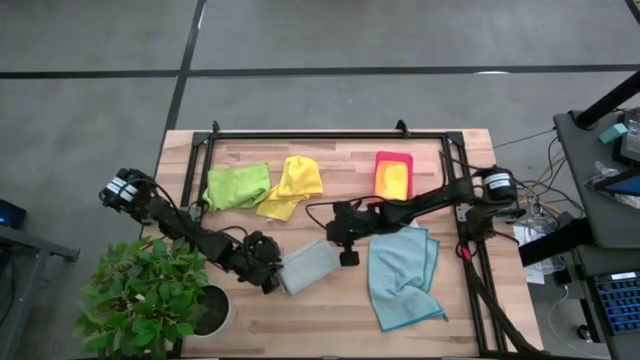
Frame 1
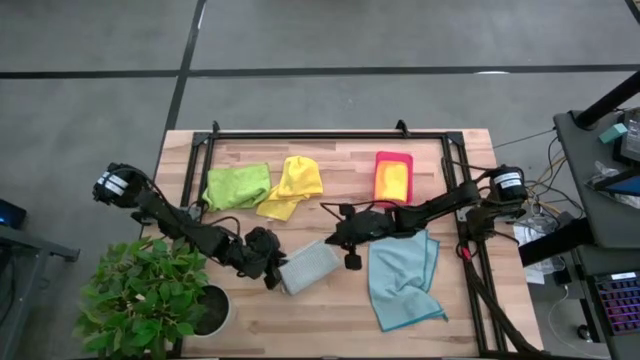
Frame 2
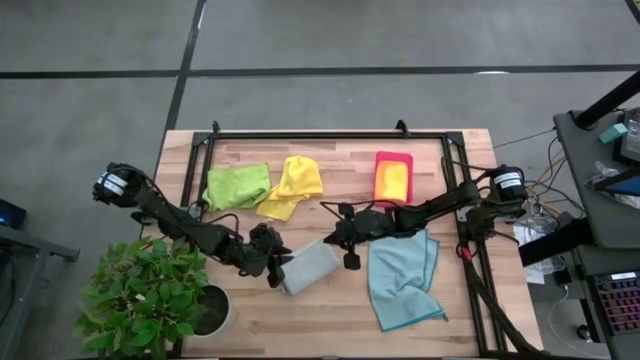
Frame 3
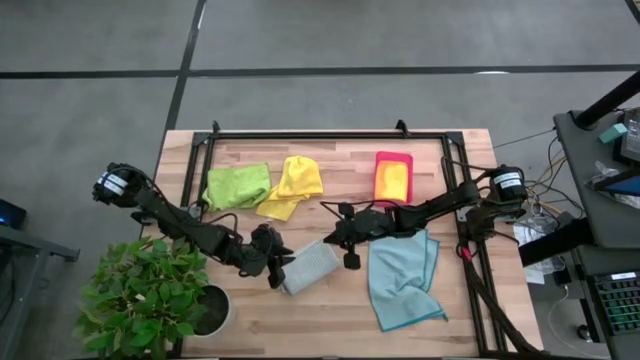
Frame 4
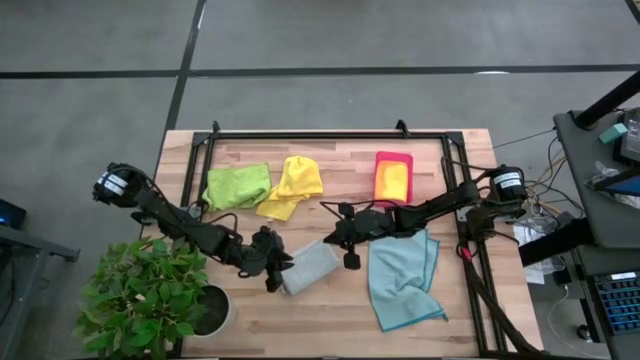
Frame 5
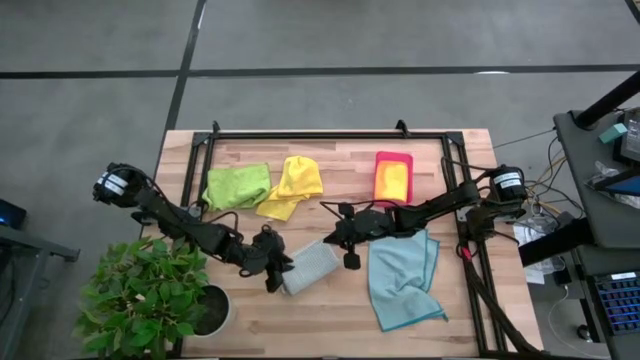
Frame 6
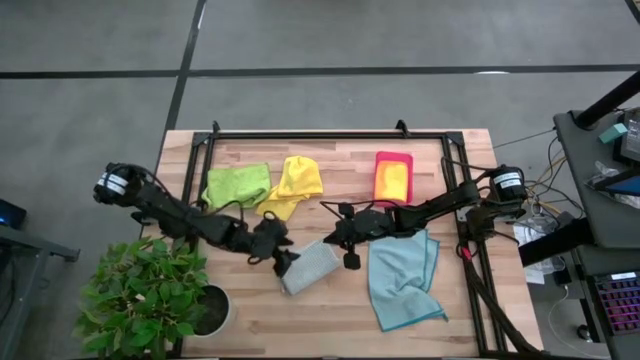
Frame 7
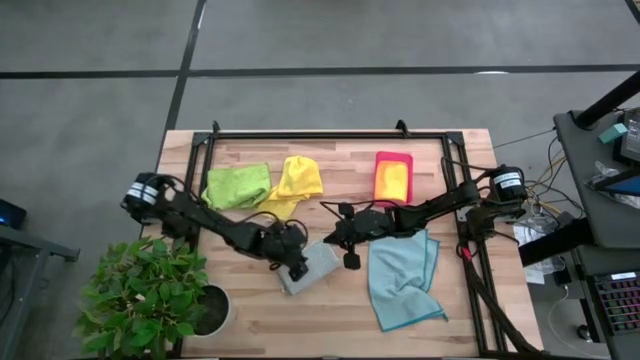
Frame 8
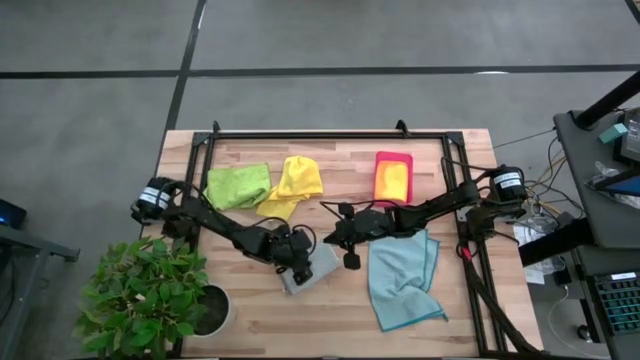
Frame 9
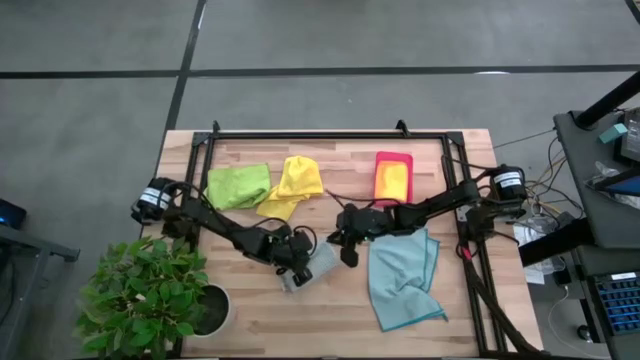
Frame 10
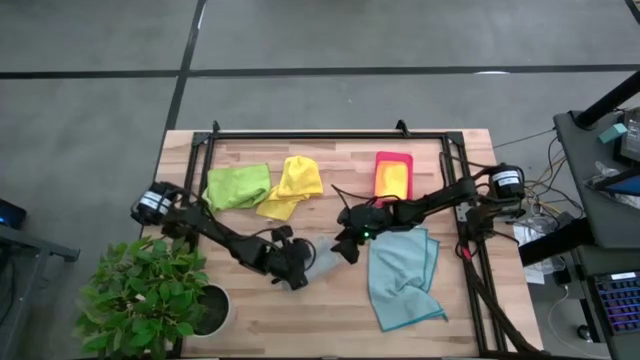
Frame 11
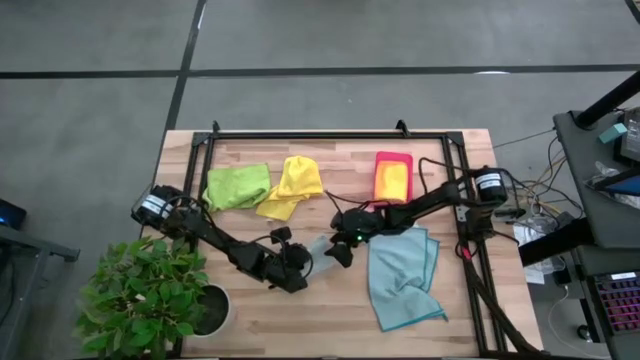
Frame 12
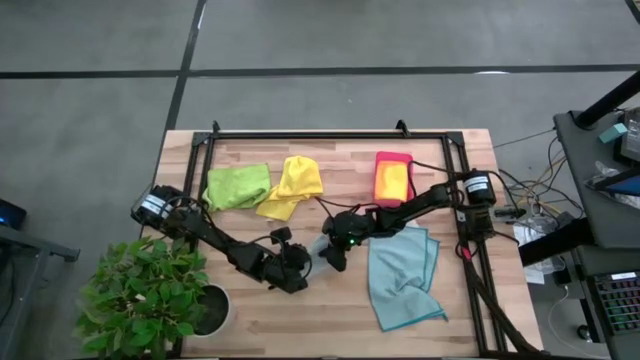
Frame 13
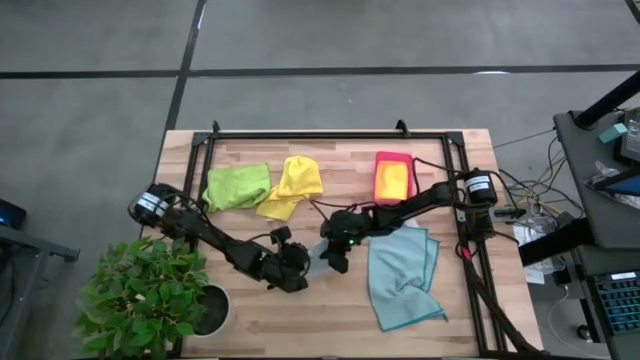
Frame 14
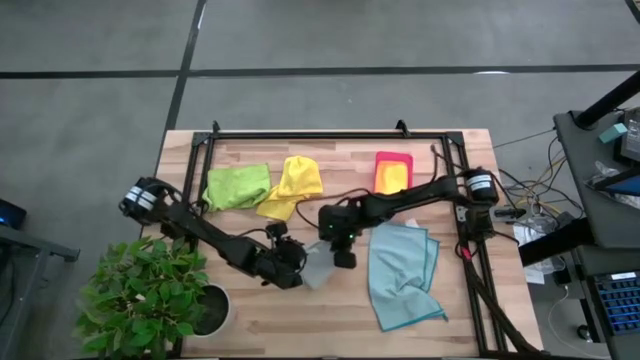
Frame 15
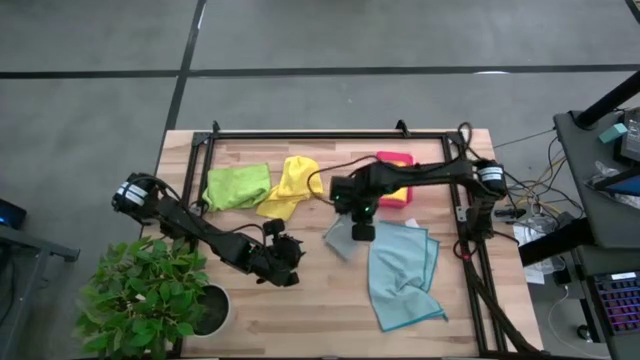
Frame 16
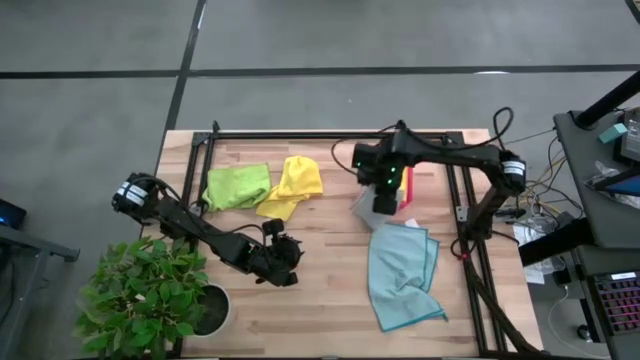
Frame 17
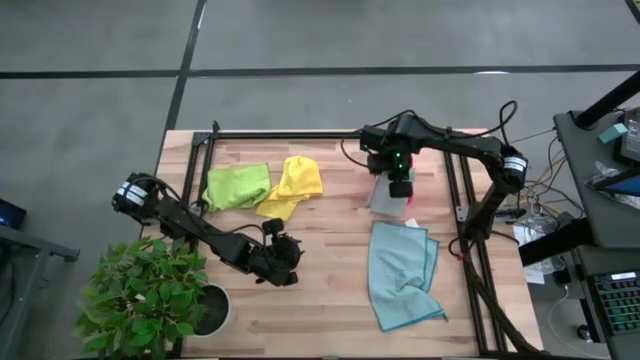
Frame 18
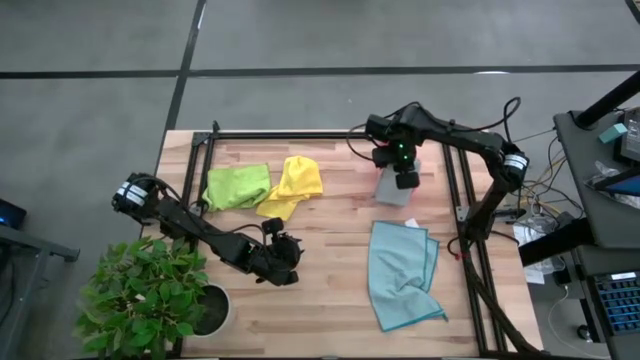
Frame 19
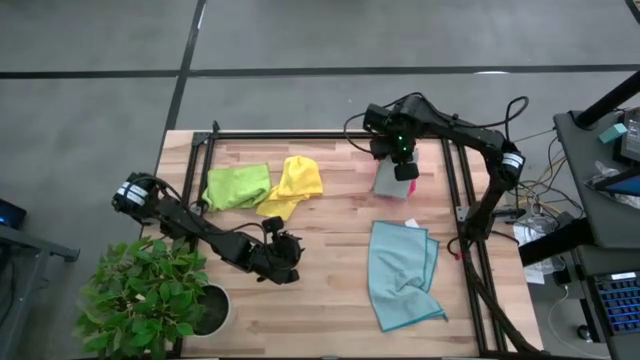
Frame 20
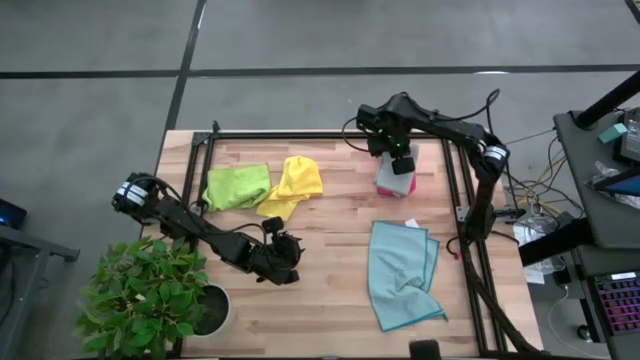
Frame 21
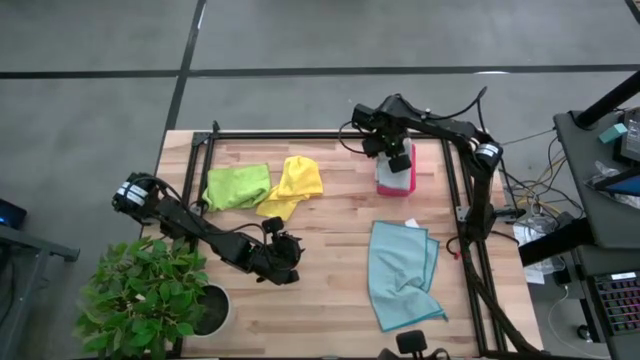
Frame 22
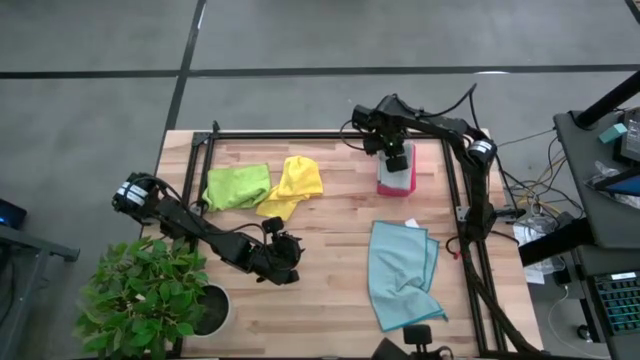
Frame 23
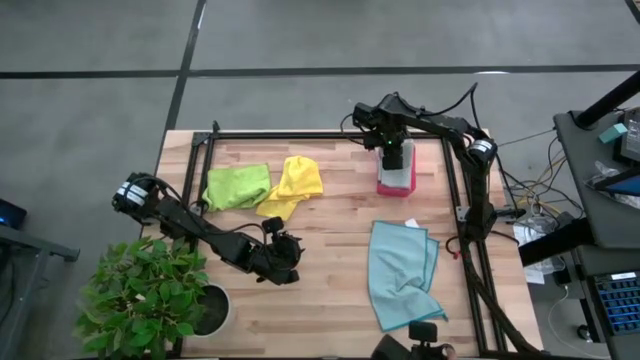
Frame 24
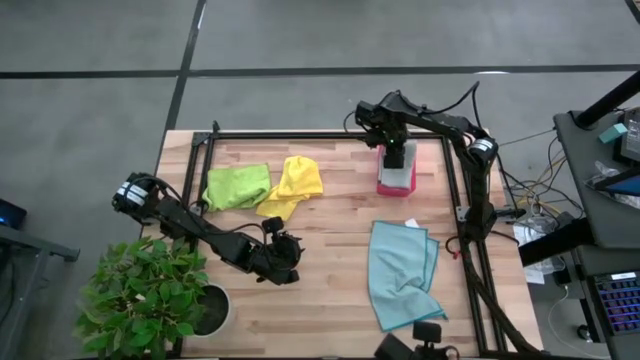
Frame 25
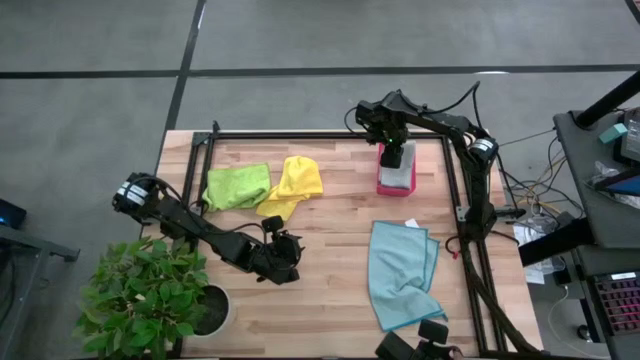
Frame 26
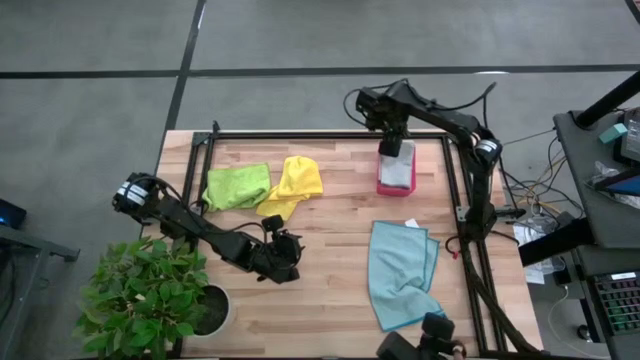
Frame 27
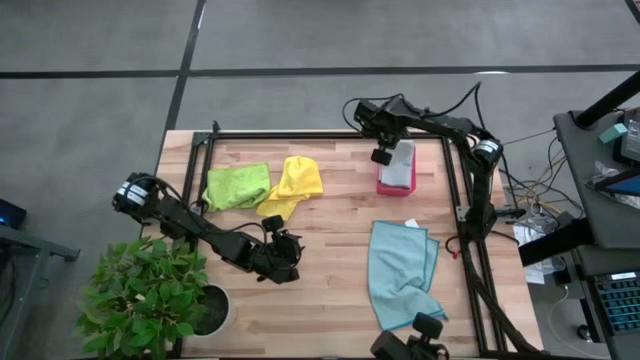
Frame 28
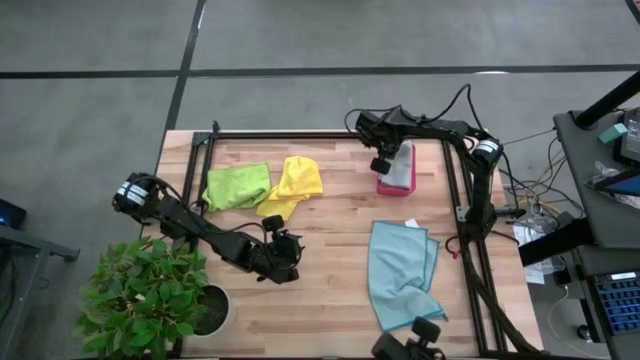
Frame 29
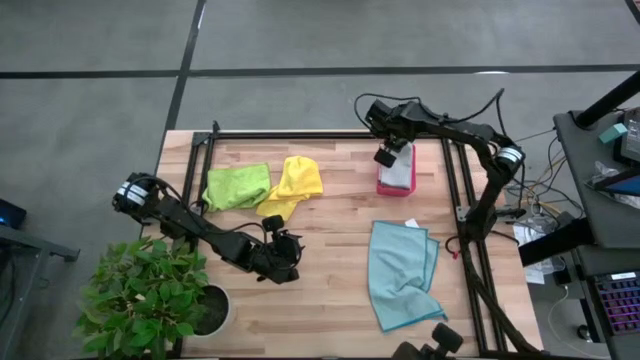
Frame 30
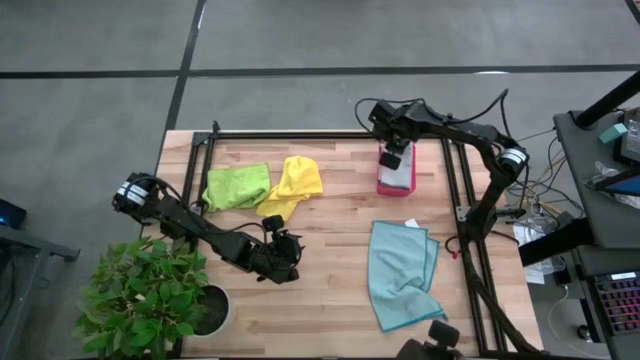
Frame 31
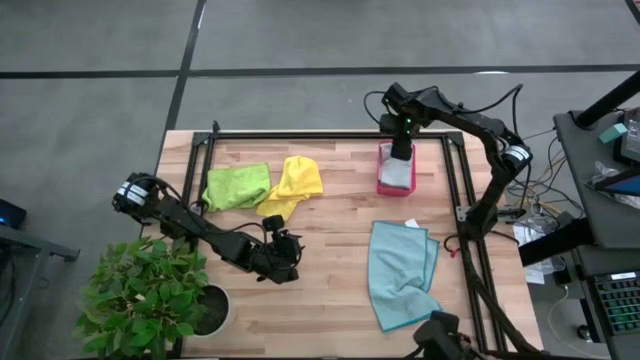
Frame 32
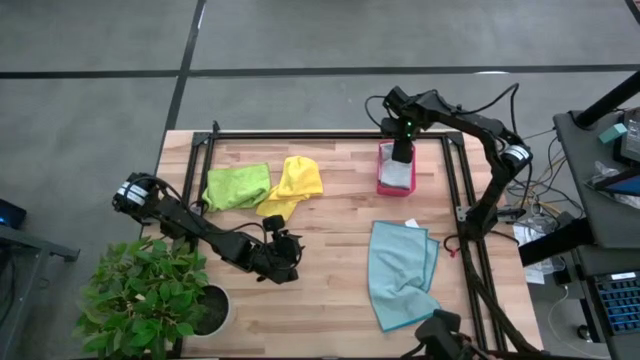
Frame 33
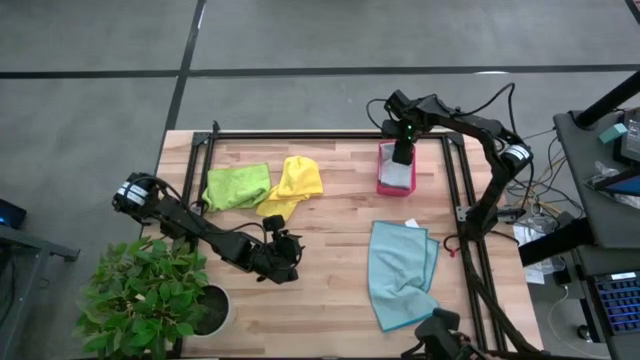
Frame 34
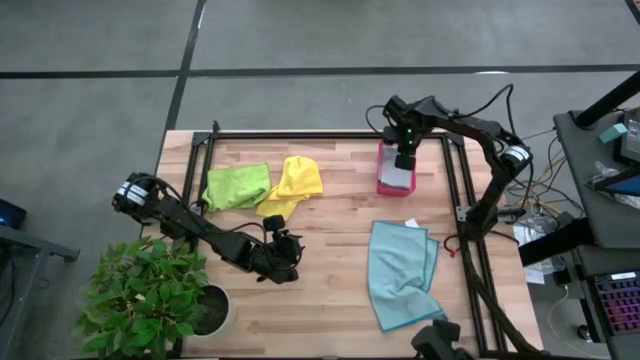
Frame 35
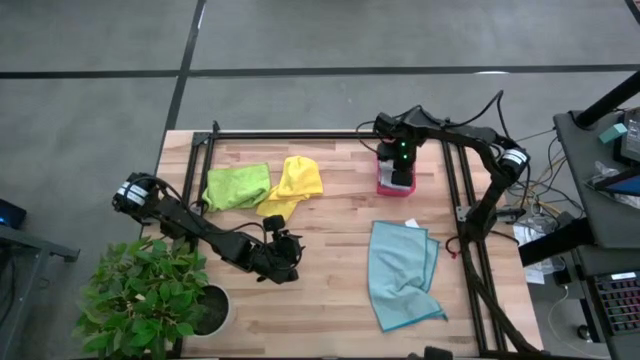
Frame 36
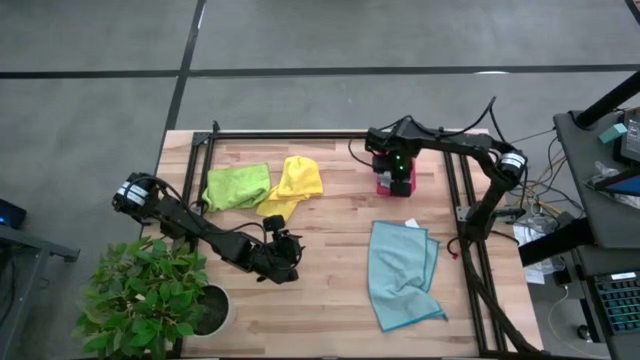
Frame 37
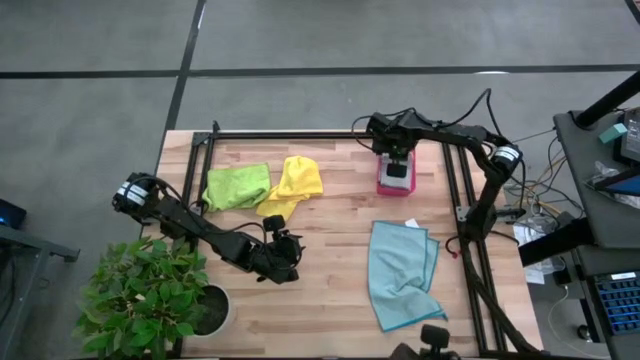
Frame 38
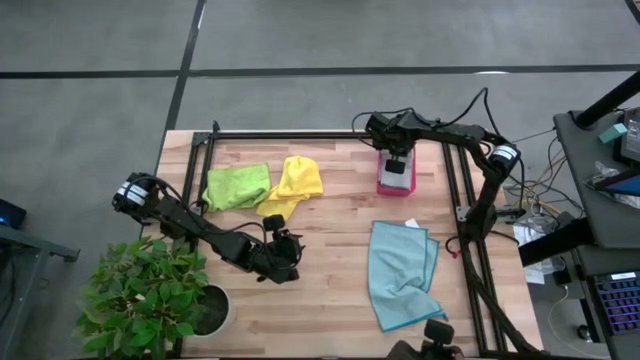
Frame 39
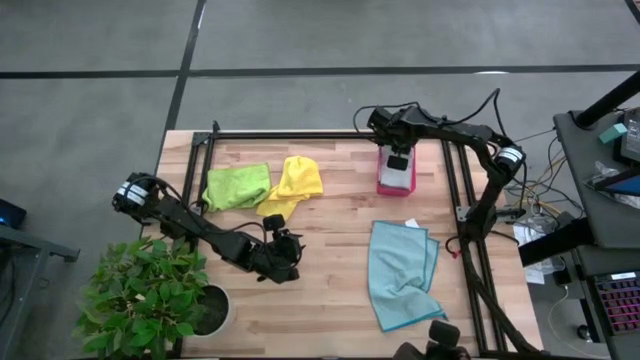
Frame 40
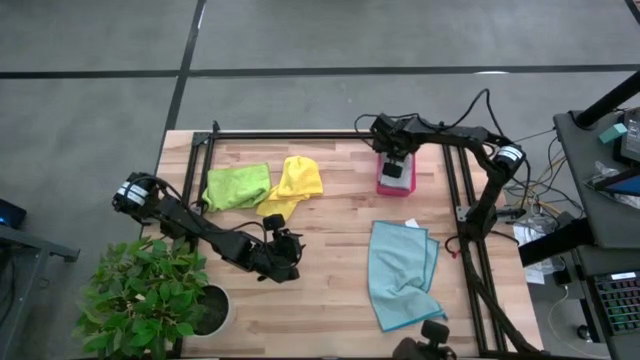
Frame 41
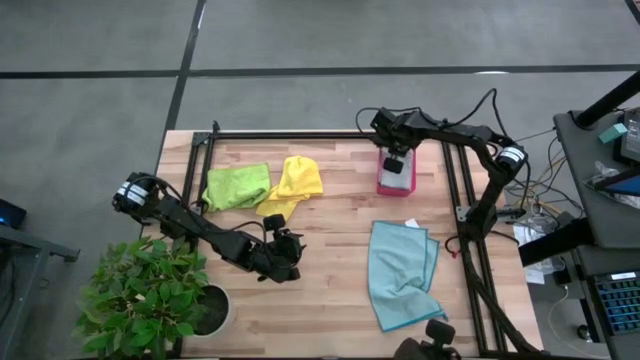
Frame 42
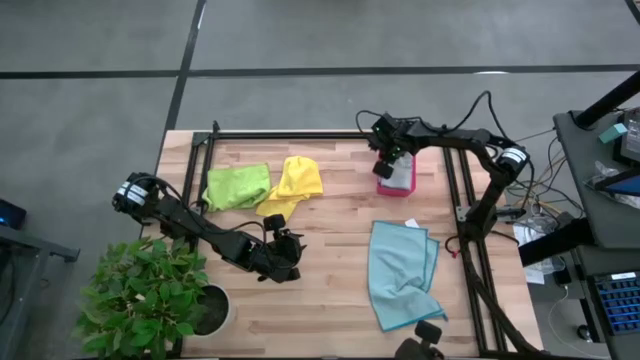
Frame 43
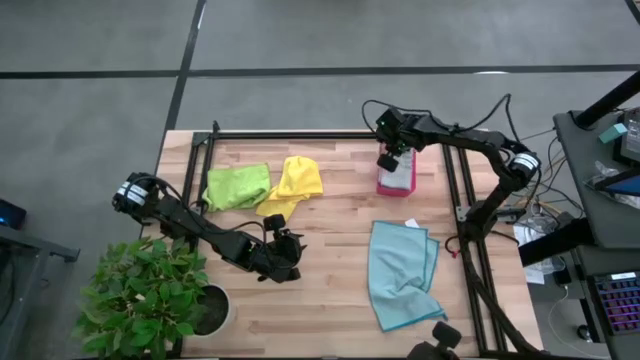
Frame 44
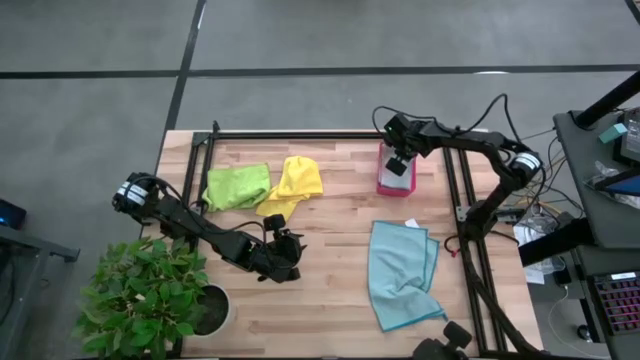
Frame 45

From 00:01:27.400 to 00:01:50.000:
Task: Fold microfiber towels
Put the folded gray microfiber towel into the red bin
